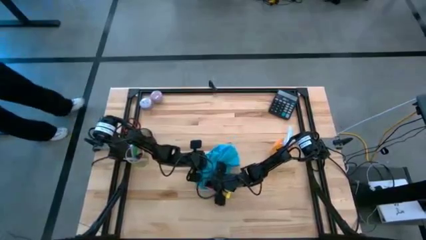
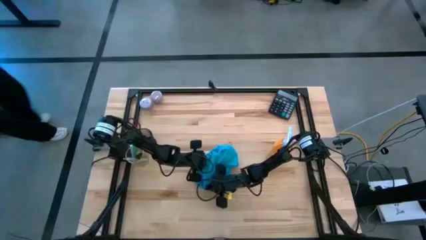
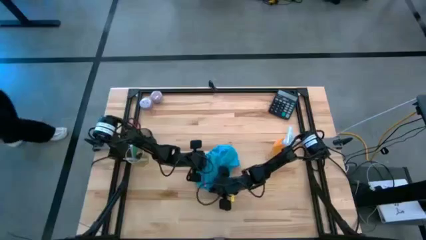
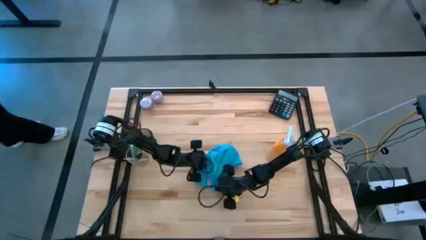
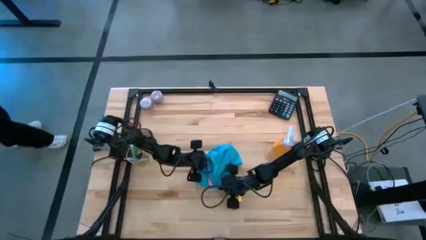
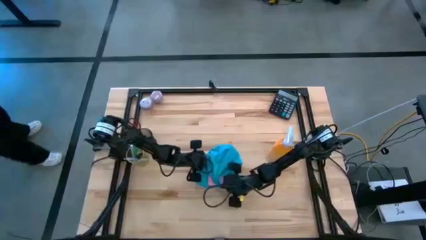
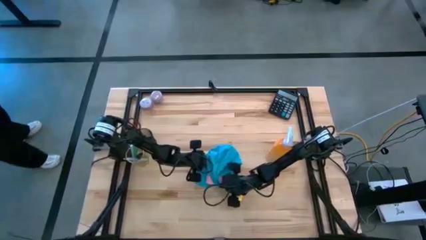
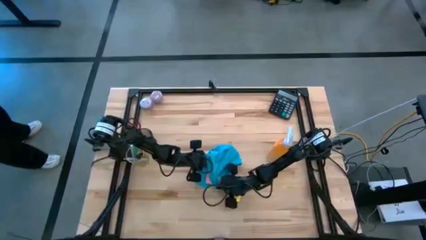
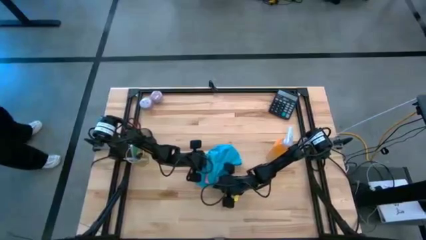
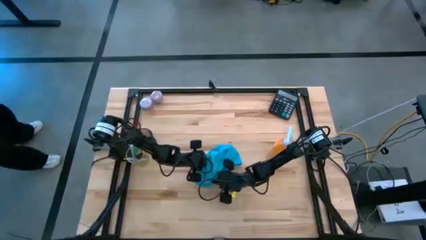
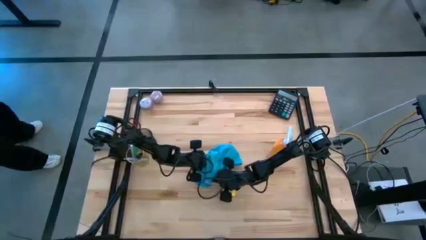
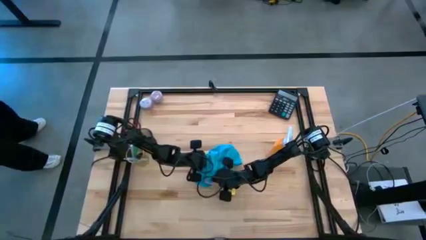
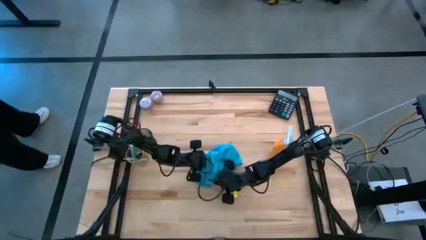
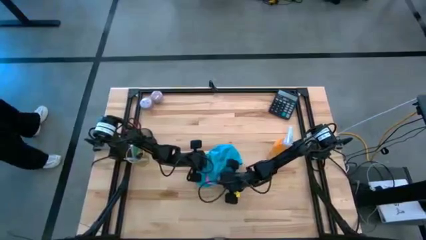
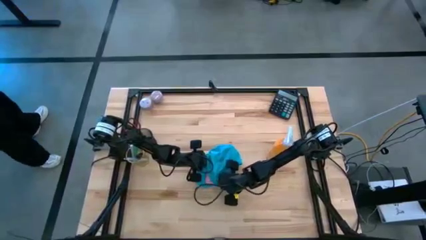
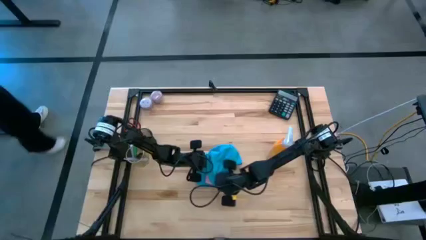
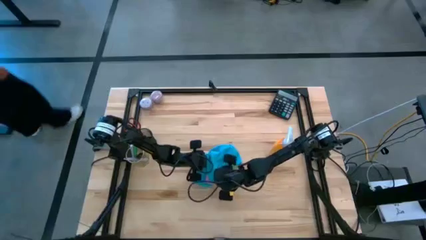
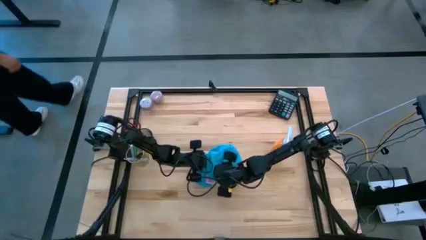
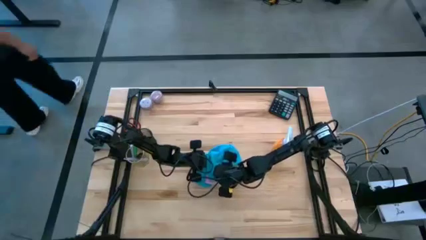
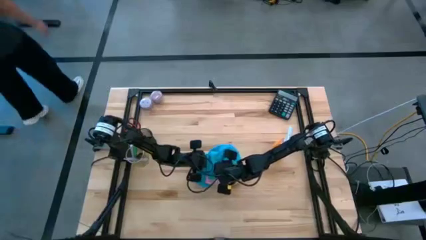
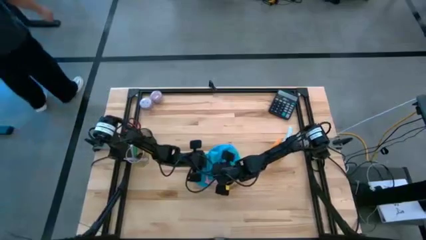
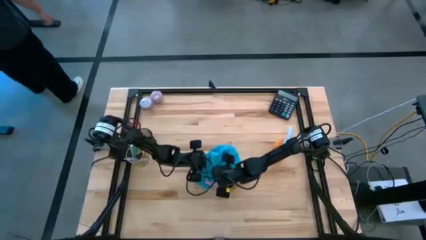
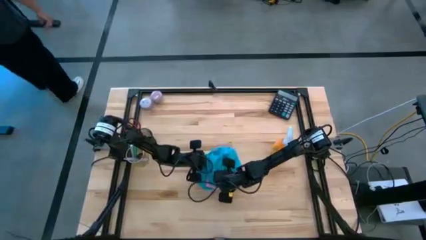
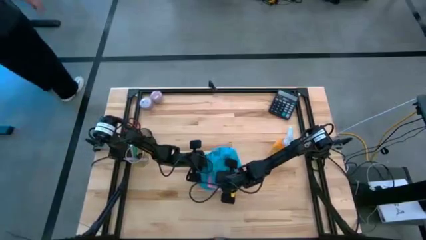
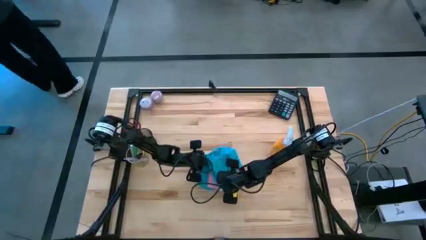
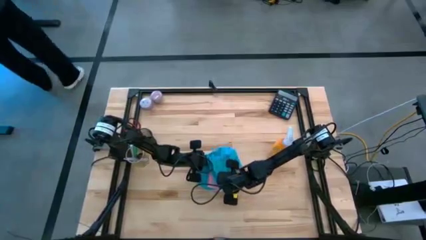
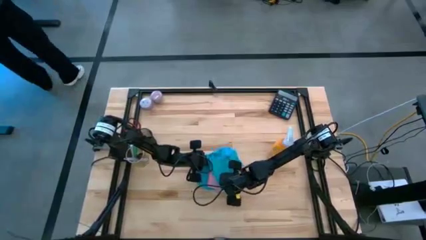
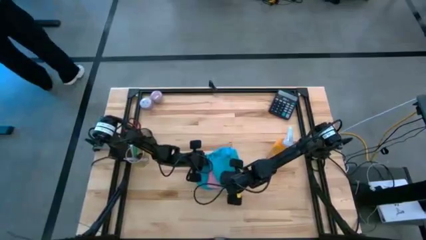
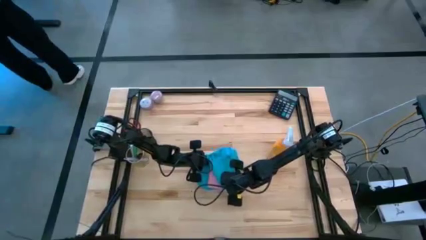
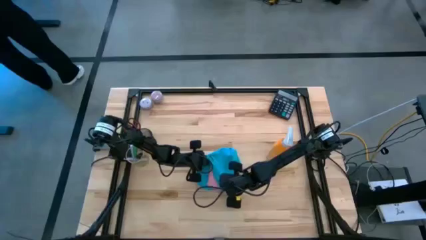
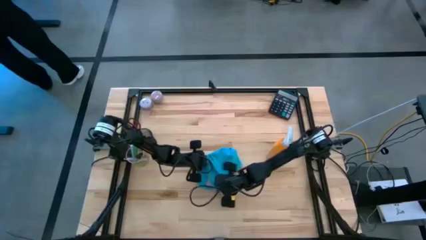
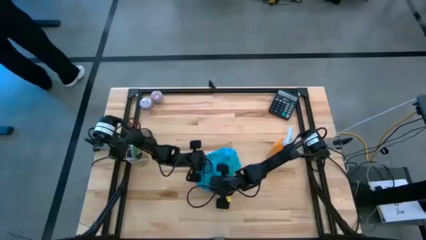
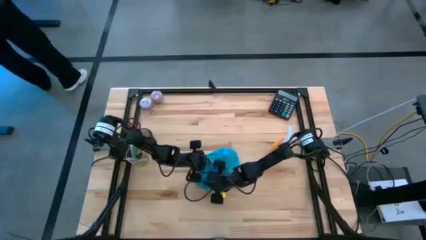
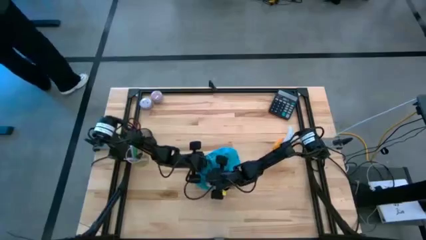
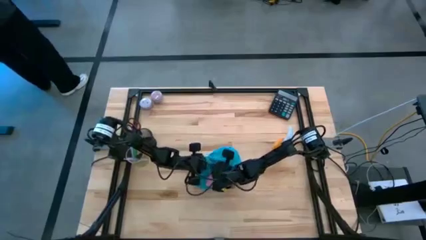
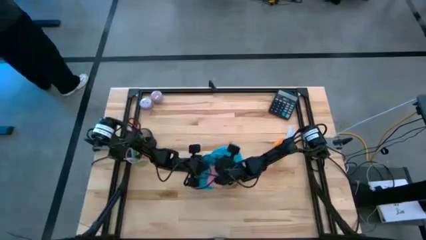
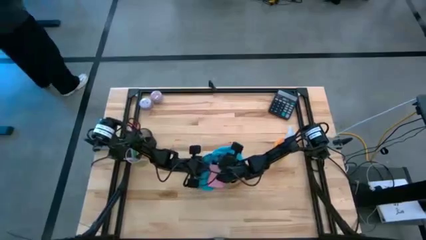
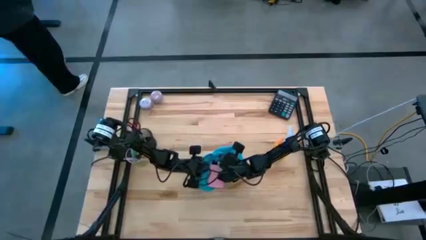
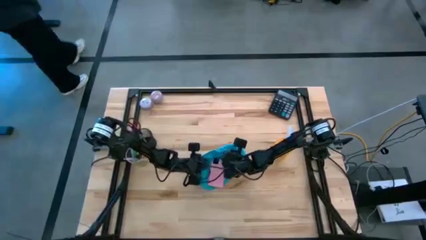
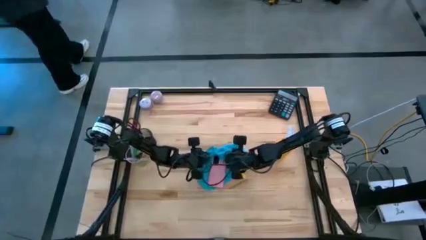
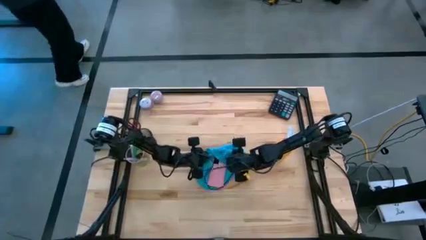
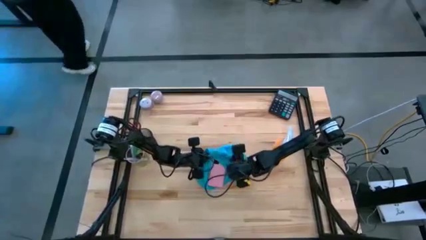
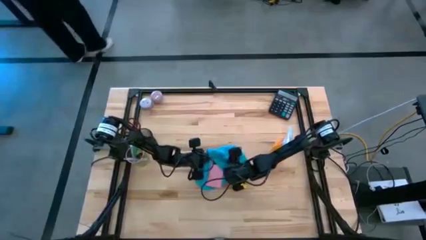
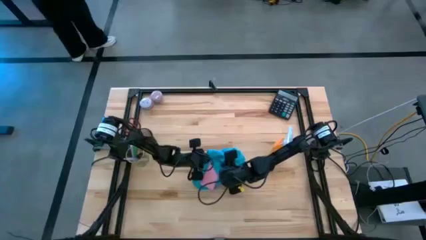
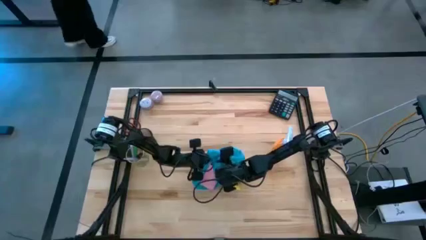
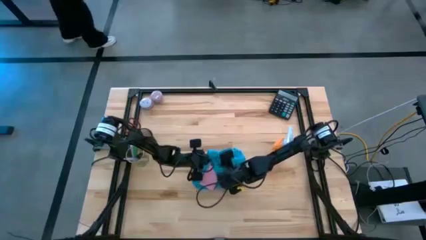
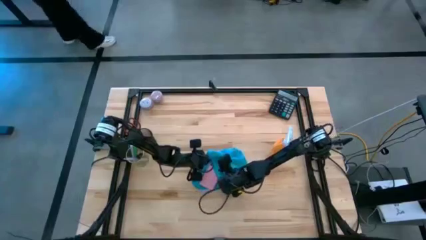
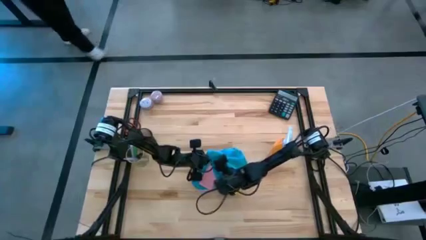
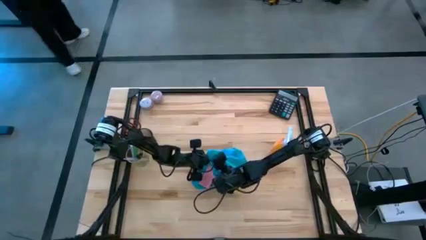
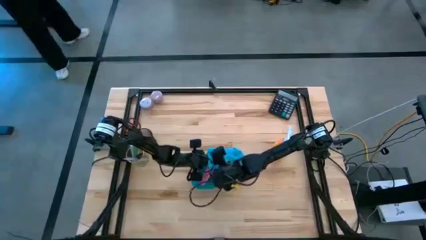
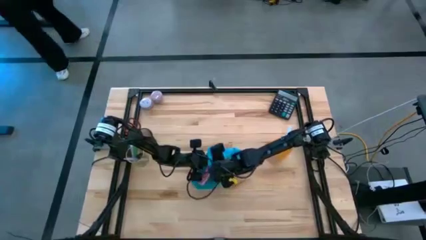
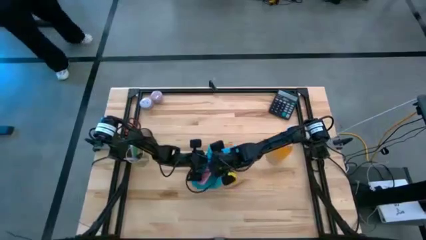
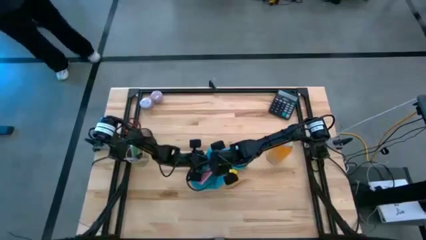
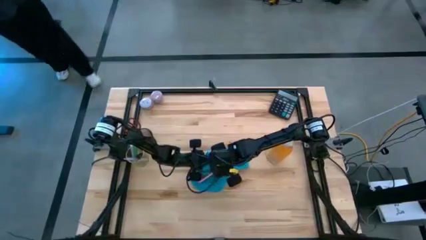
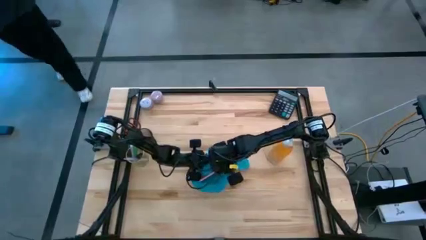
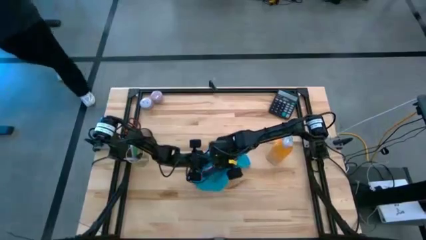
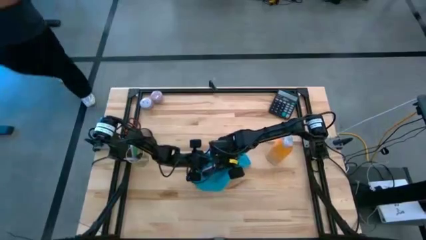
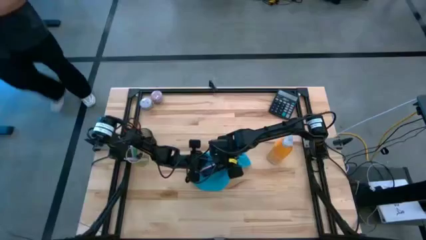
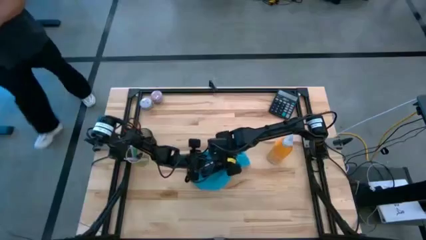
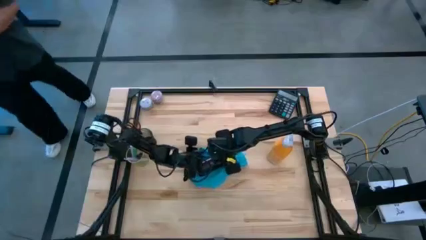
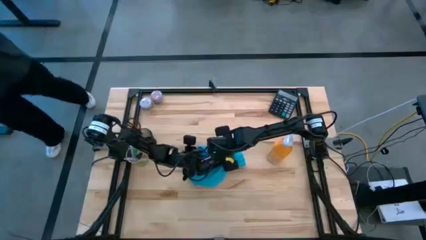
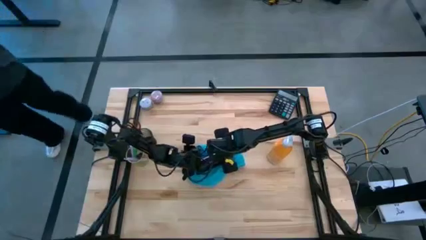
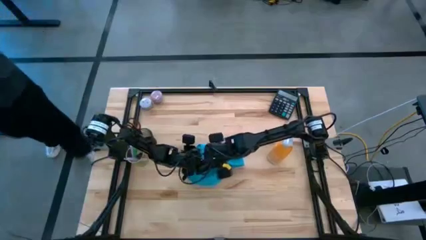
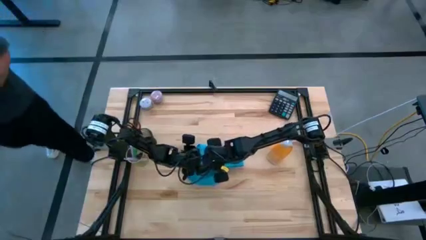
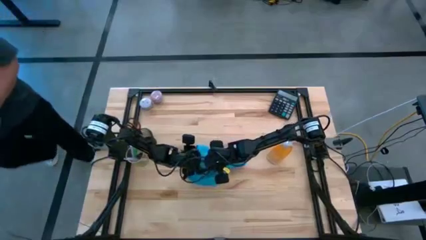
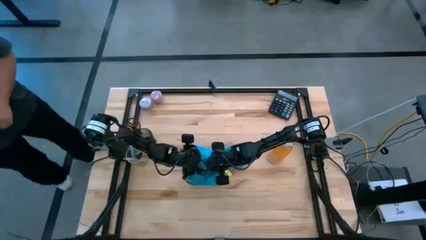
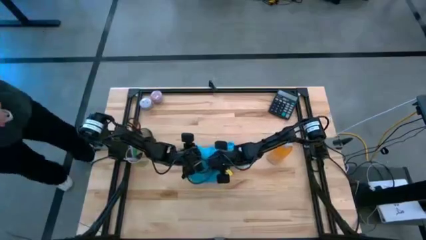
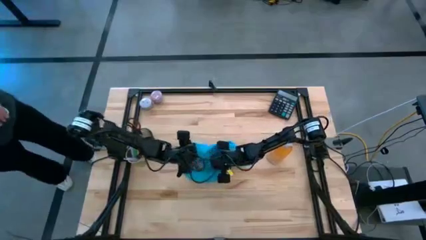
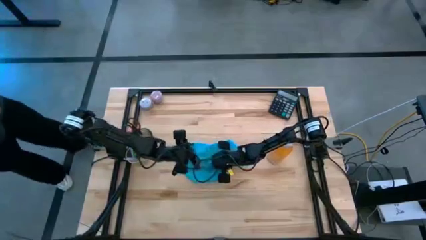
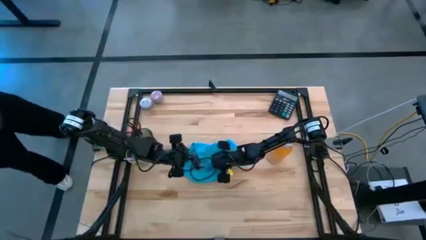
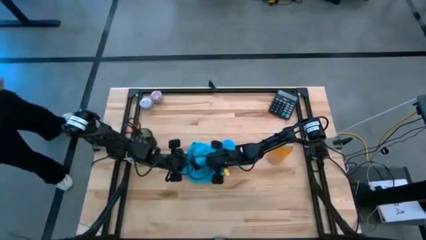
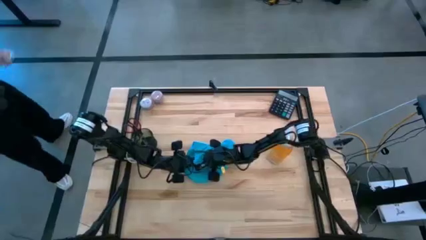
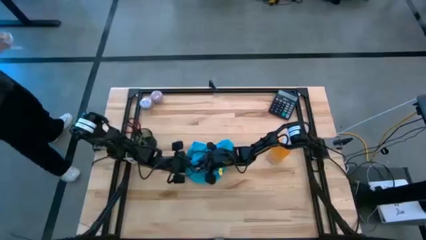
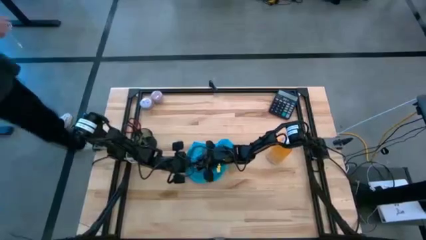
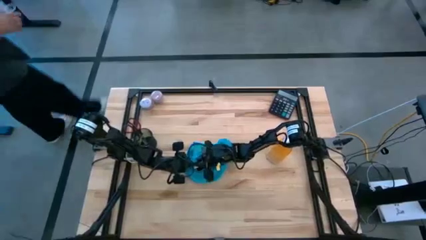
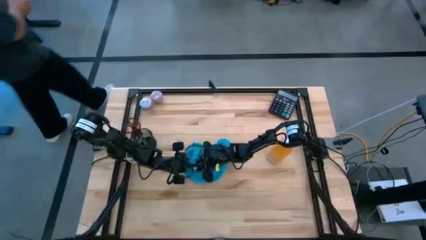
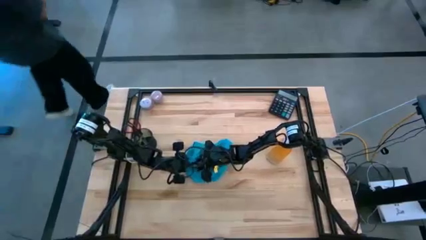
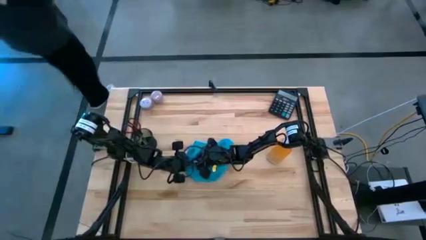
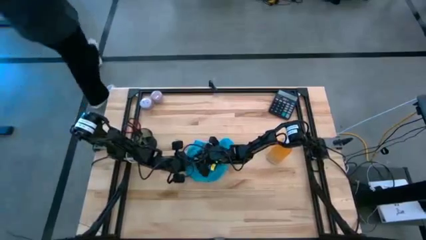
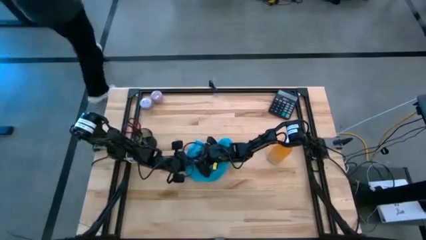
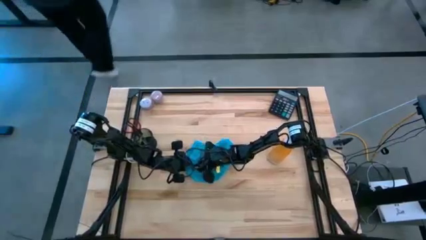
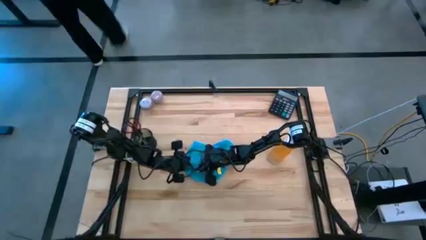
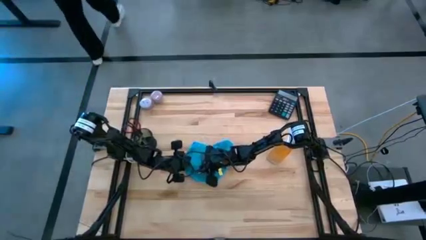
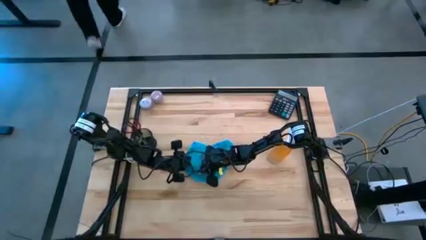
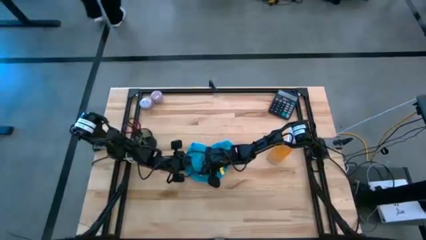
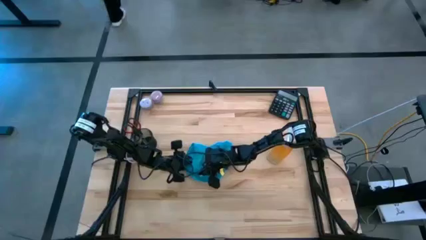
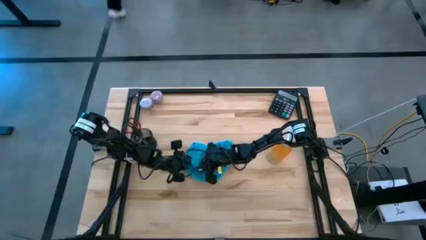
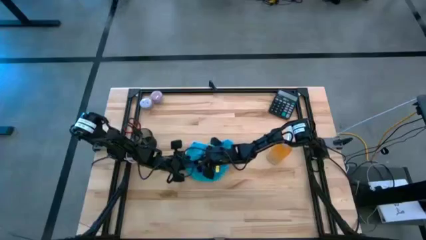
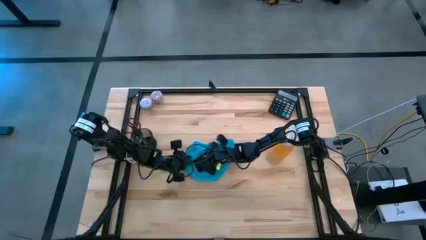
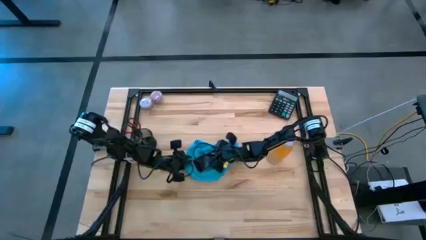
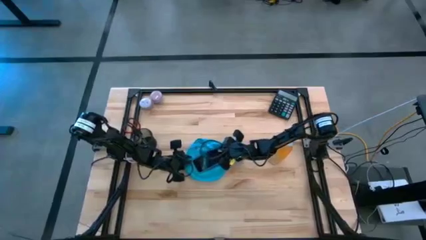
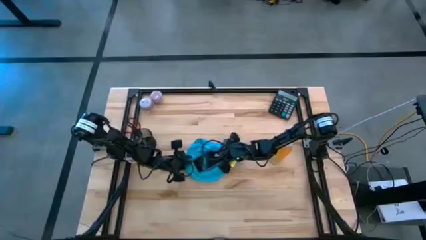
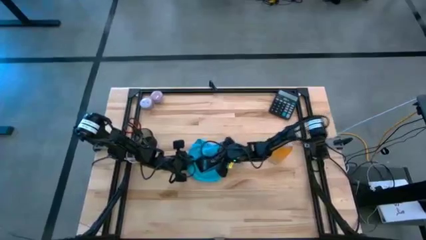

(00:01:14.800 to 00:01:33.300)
Task: Apply microfiber cloth
Wipe the pink cellphone with the blue microfiber cloth
